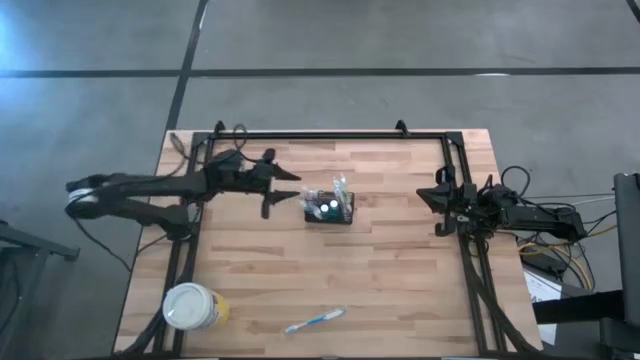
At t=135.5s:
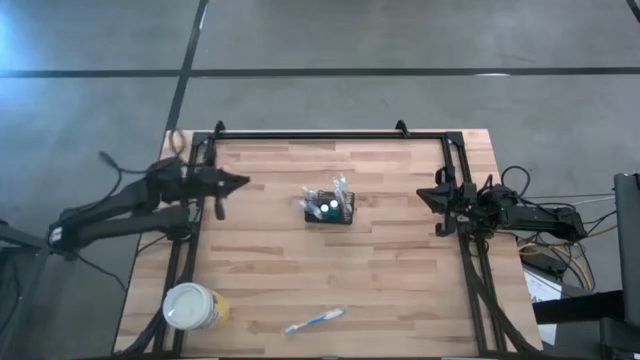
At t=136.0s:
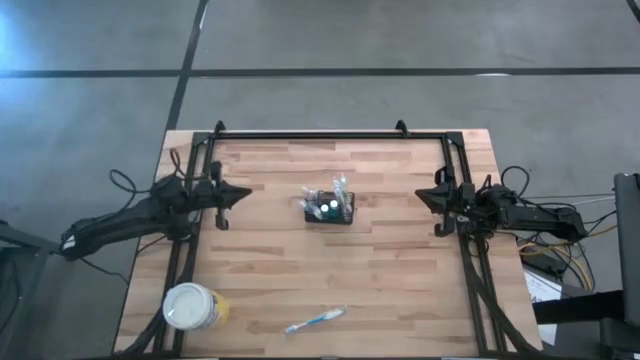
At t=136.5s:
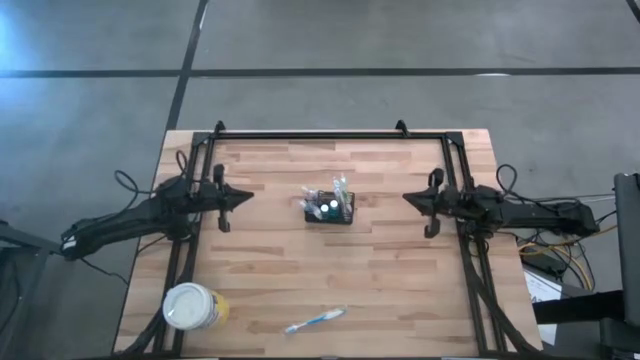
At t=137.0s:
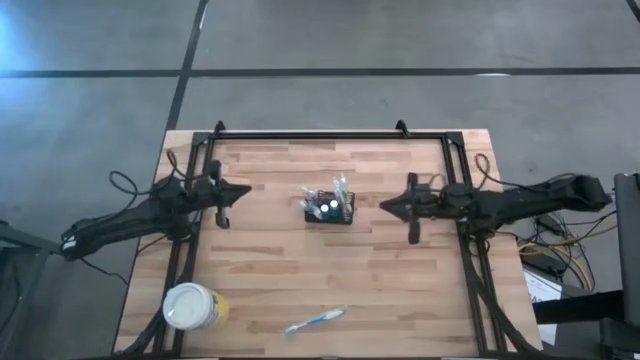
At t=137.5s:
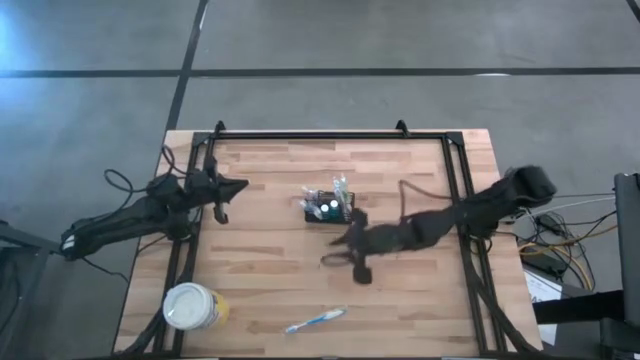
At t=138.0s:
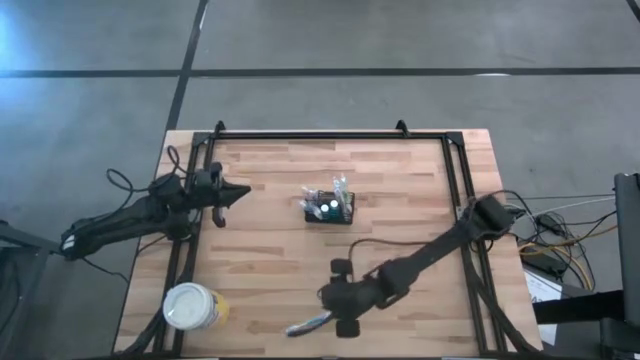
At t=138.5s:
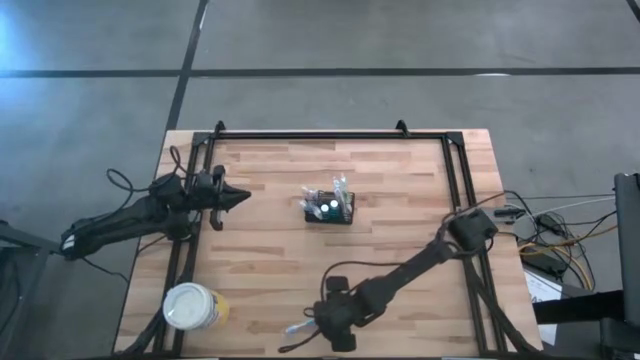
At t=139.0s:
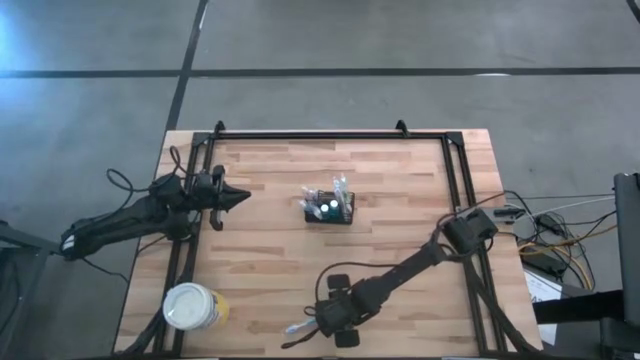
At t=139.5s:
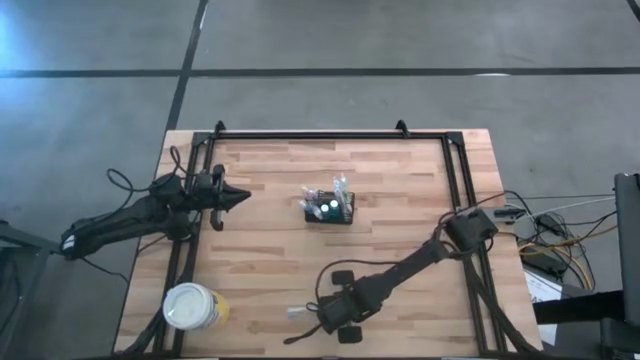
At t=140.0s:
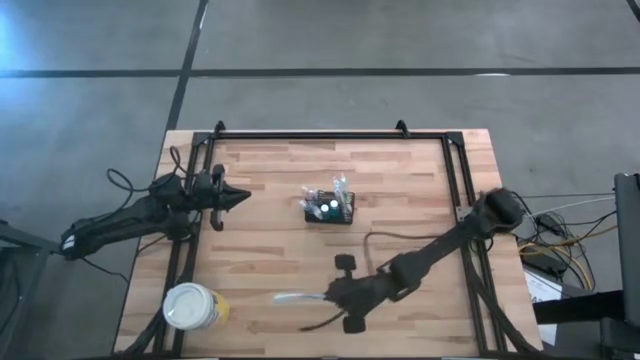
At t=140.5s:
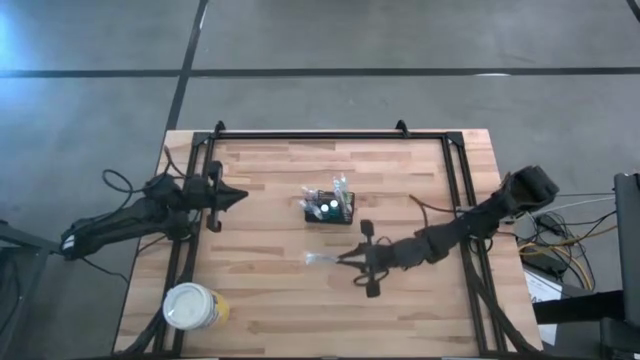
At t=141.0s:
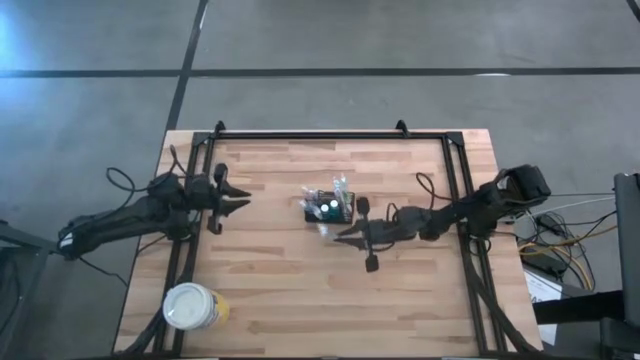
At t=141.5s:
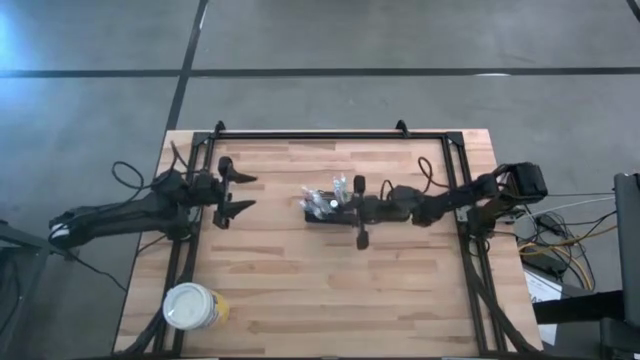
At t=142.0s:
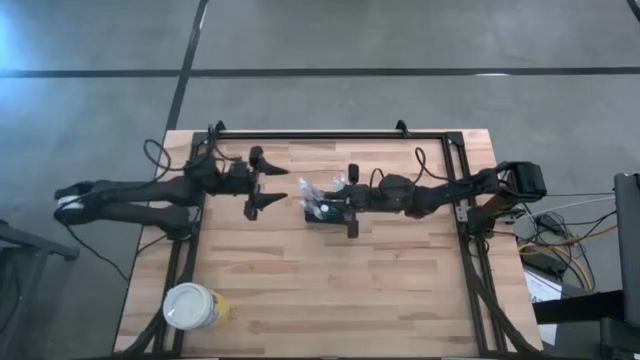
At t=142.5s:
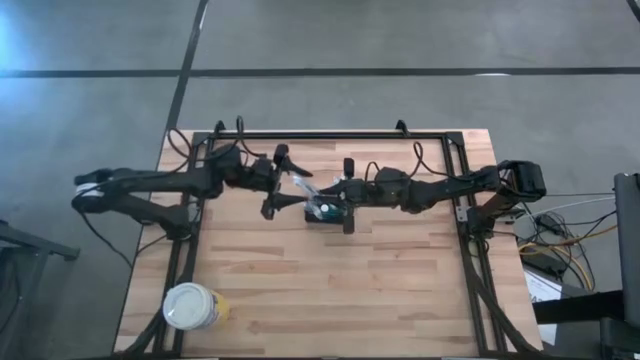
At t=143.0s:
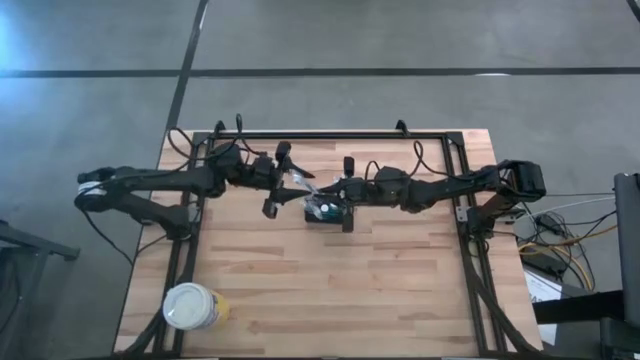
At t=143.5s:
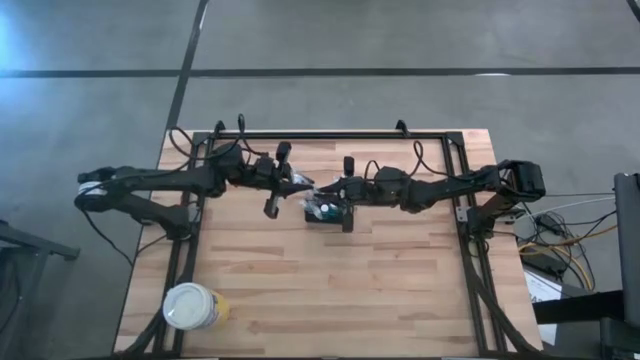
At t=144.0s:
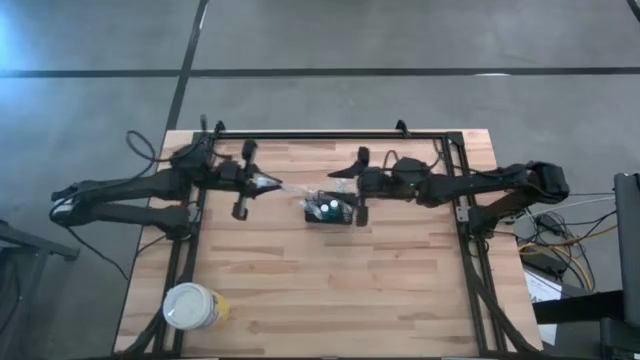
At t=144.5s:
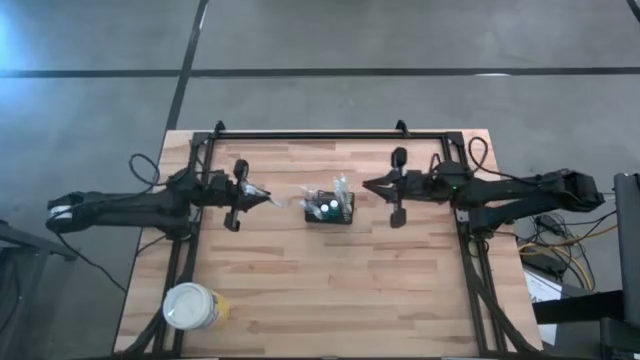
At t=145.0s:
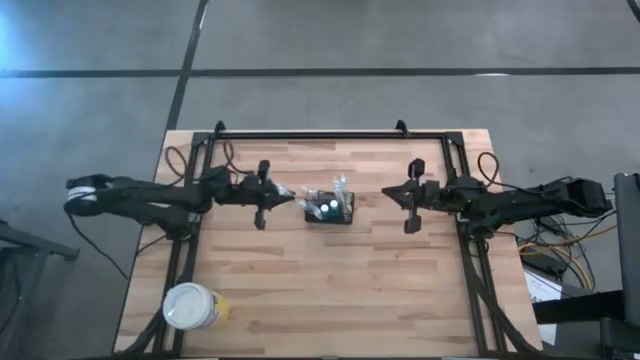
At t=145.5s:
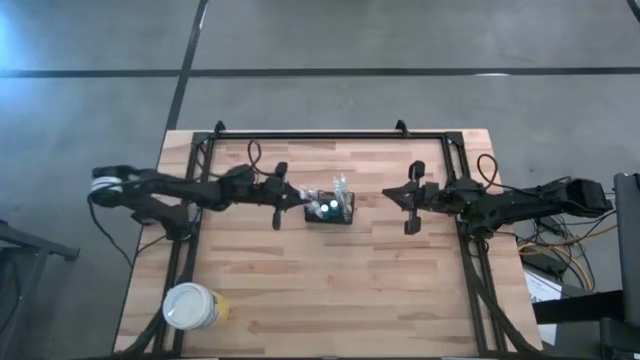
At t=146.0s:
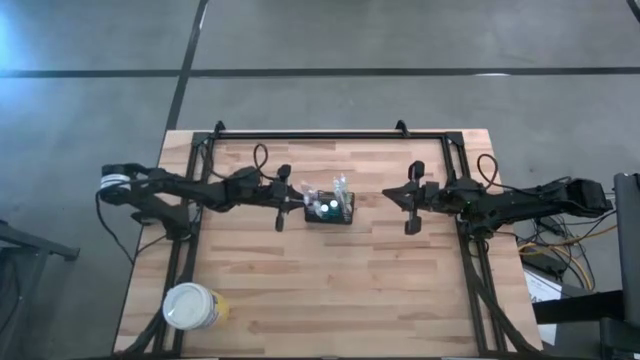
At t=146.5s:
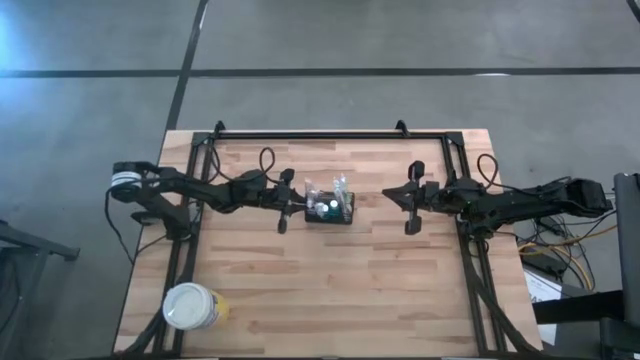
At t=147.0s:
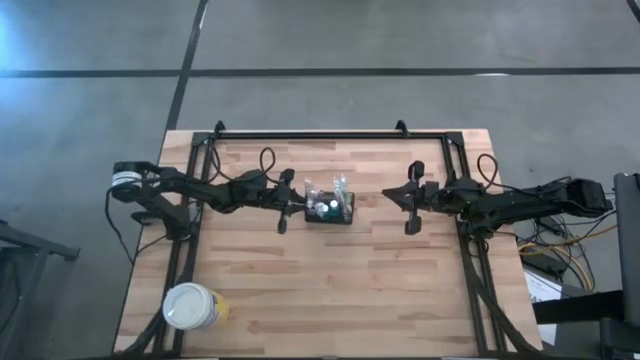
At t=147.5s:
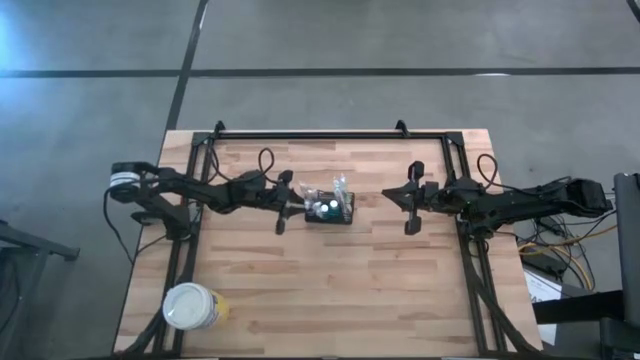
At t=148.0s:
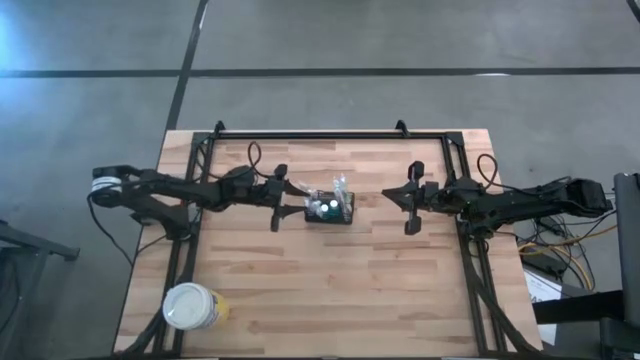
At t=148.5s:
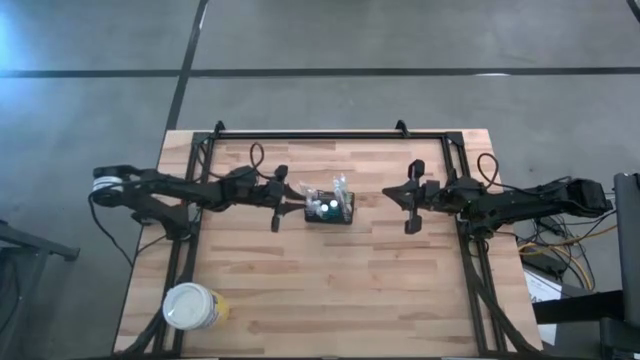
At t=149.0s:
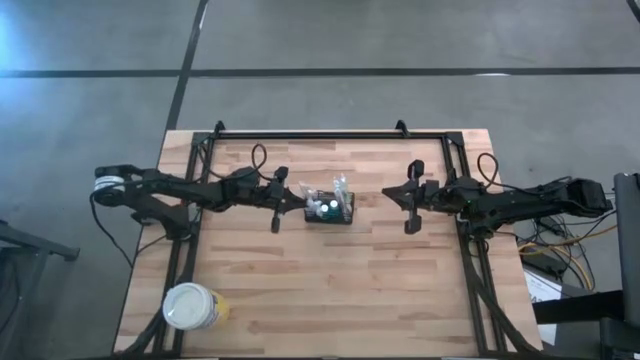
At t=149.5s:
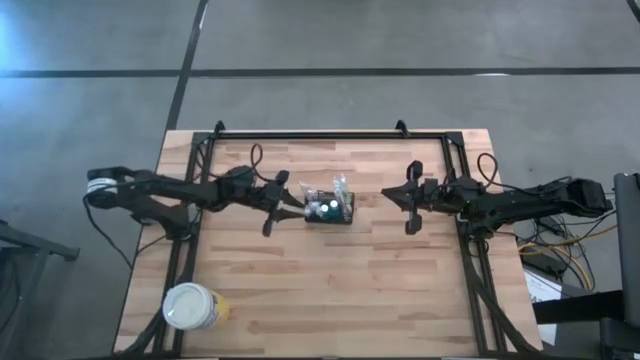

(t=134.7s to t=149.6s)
Task: Pick & Place toothbrushing station
Put the blue toothbrush into the black organizer

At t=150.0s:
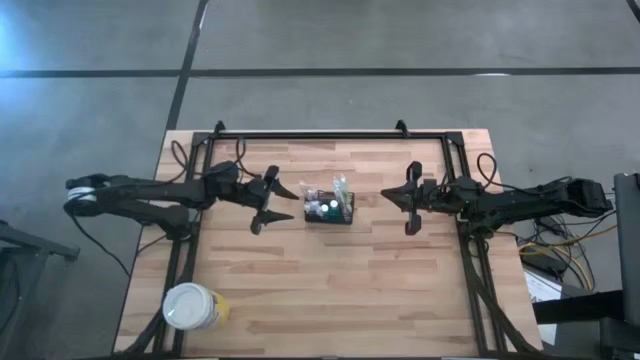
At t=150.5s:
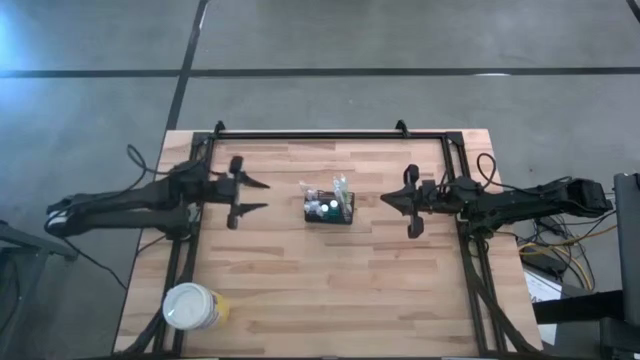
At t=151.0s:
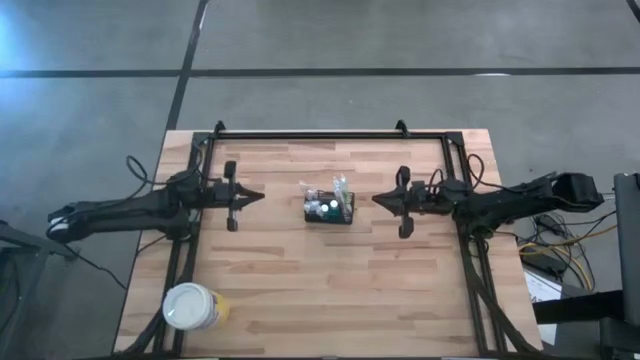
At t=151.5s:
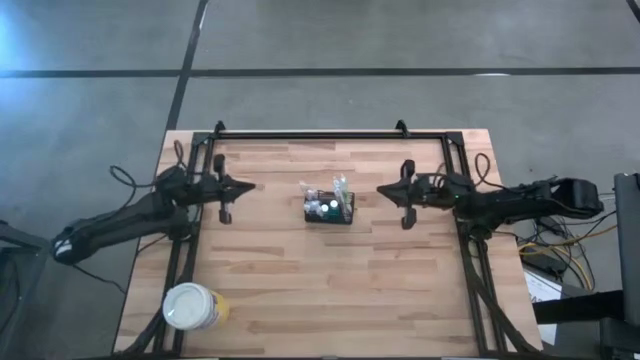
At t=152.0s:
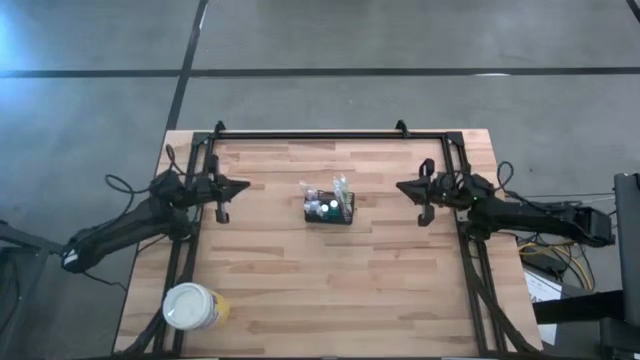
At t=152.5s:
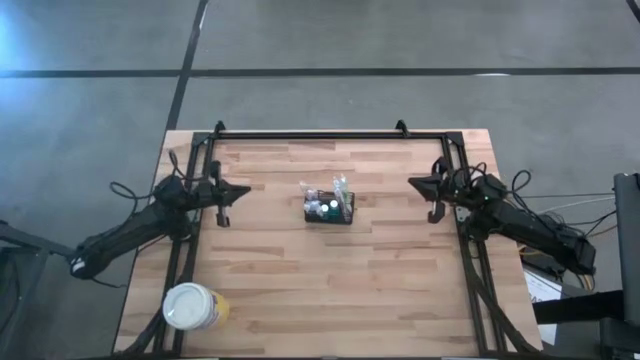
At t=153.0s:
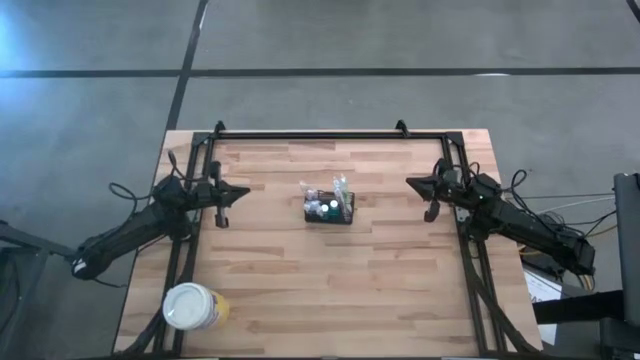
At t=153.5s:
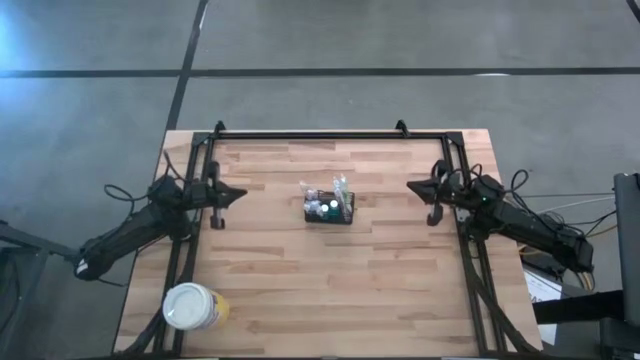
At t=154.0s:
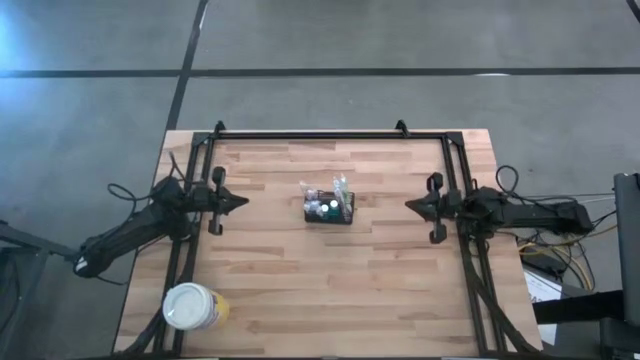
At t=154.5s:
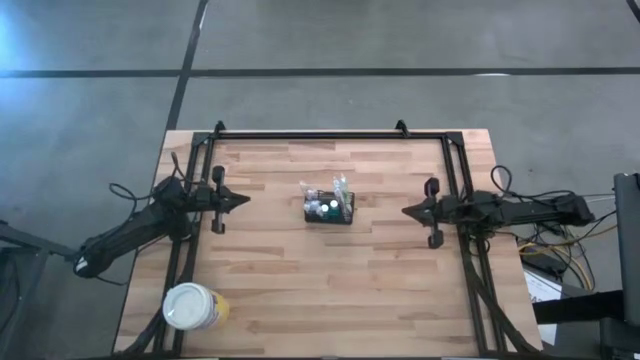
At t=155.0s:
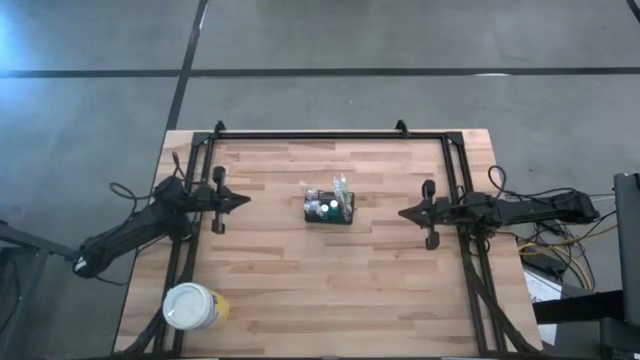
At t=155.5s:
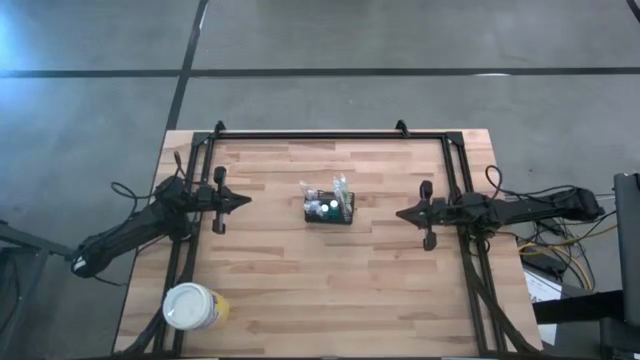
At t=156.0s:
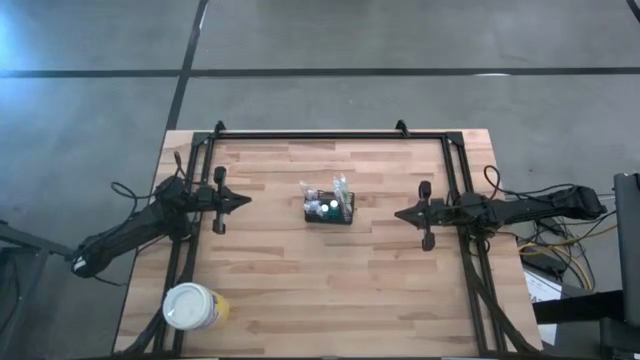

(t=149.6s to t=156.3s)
Return to Home Position
